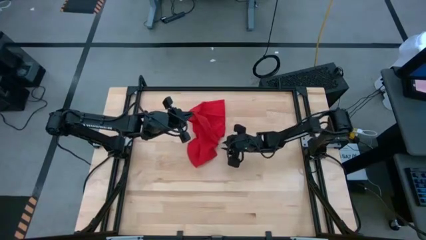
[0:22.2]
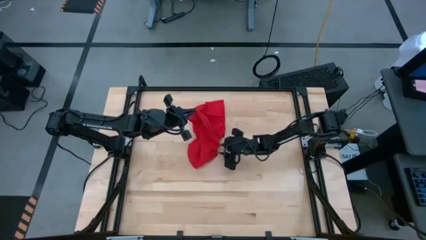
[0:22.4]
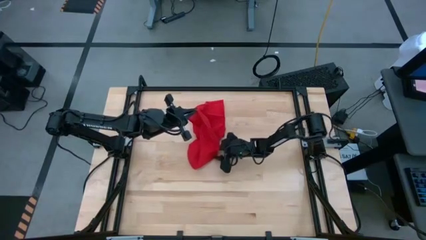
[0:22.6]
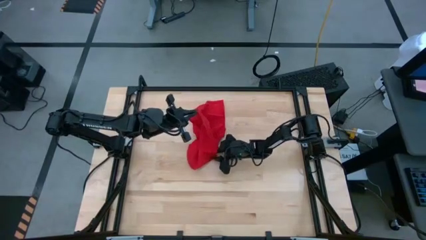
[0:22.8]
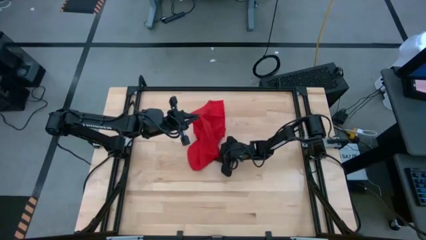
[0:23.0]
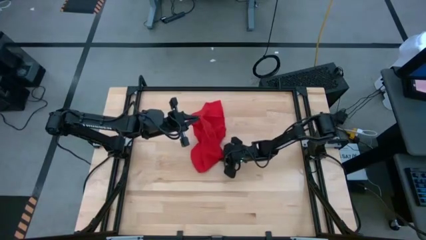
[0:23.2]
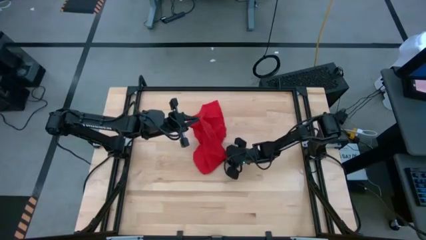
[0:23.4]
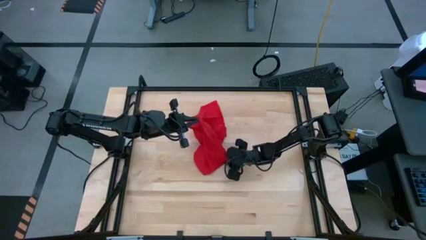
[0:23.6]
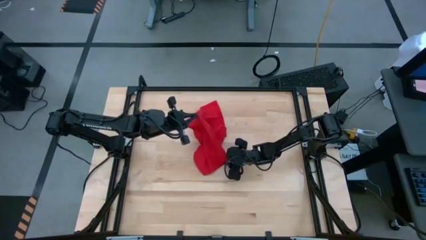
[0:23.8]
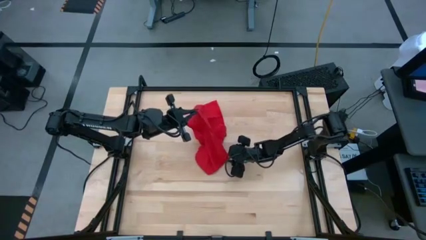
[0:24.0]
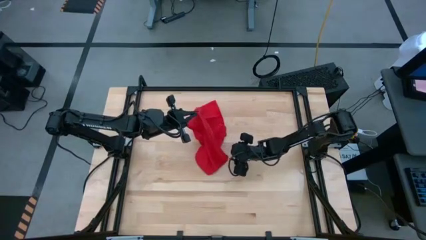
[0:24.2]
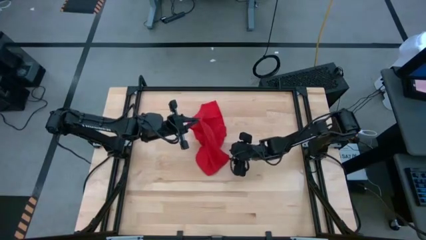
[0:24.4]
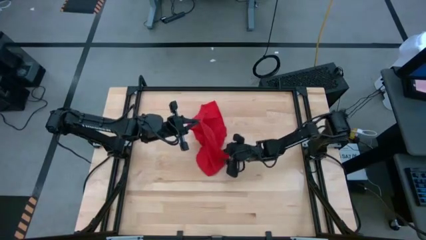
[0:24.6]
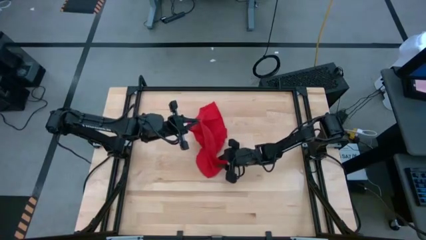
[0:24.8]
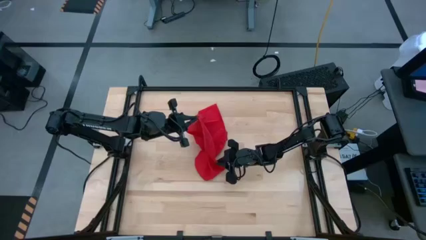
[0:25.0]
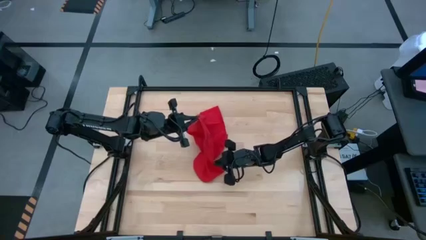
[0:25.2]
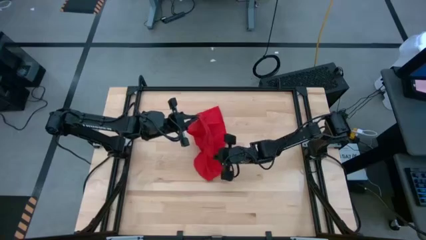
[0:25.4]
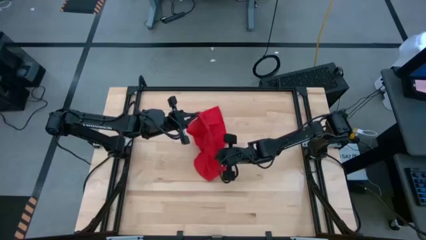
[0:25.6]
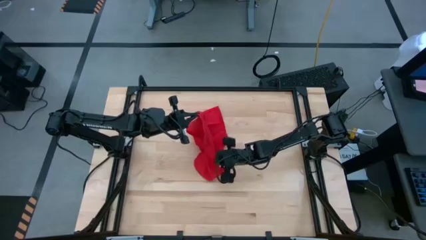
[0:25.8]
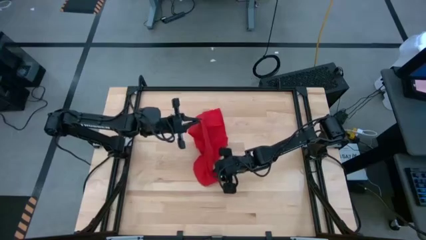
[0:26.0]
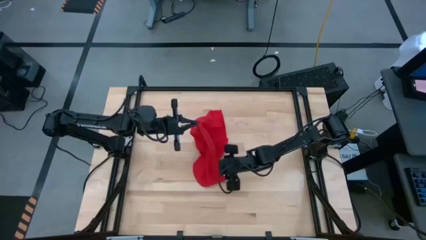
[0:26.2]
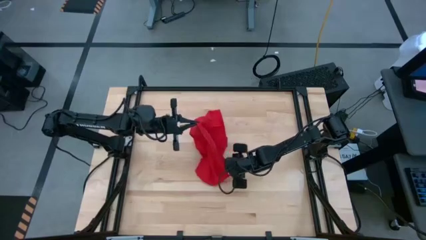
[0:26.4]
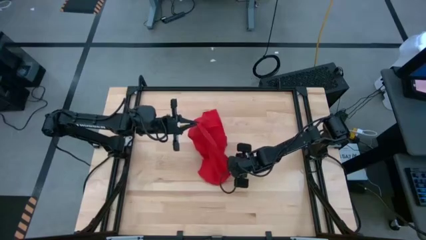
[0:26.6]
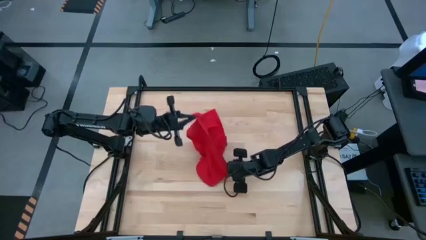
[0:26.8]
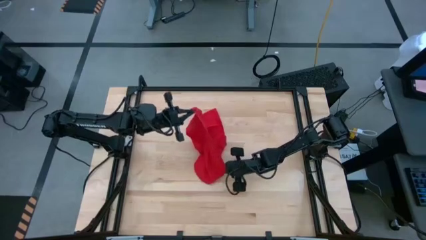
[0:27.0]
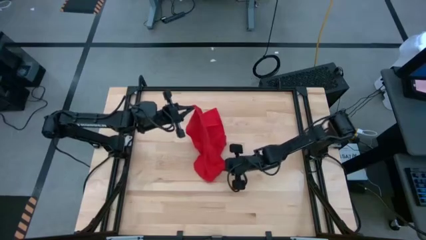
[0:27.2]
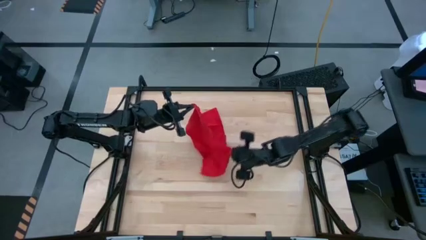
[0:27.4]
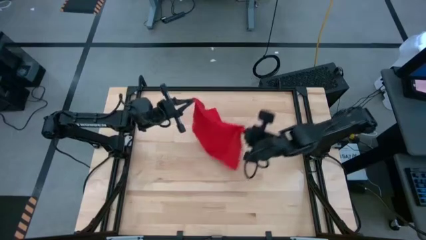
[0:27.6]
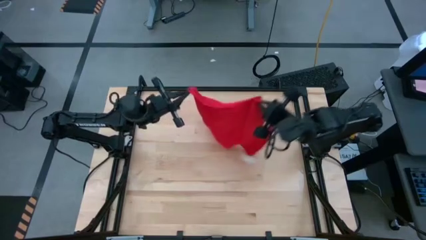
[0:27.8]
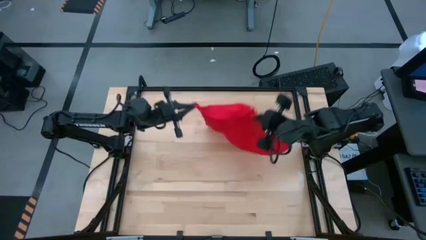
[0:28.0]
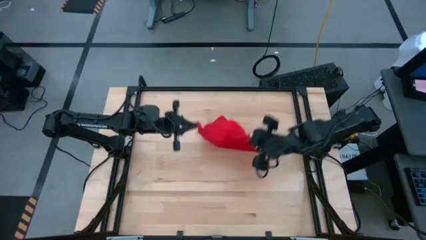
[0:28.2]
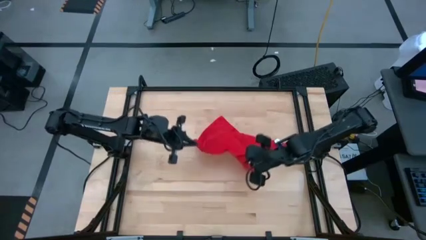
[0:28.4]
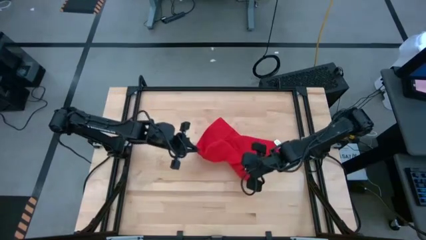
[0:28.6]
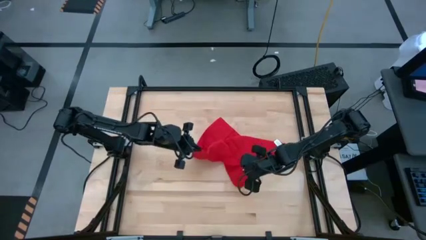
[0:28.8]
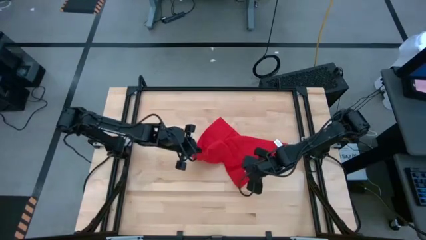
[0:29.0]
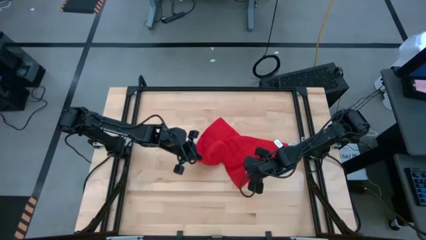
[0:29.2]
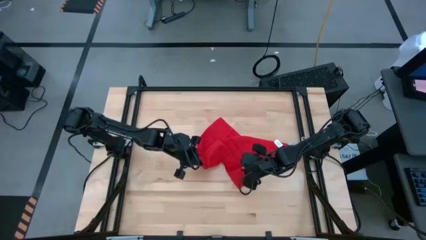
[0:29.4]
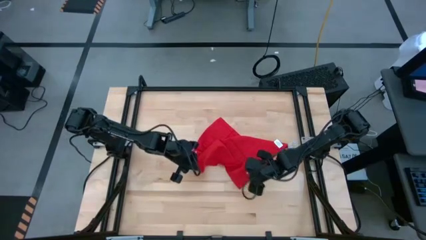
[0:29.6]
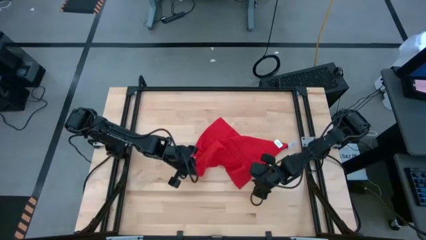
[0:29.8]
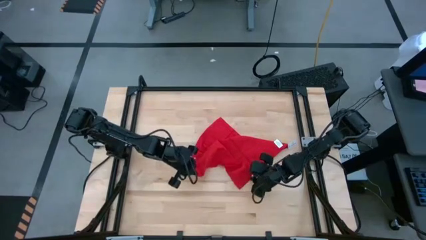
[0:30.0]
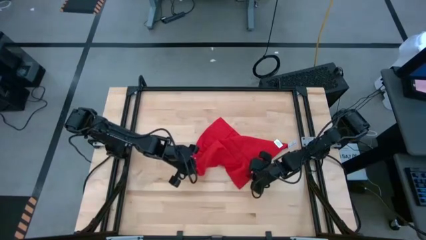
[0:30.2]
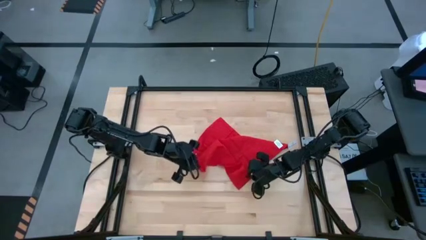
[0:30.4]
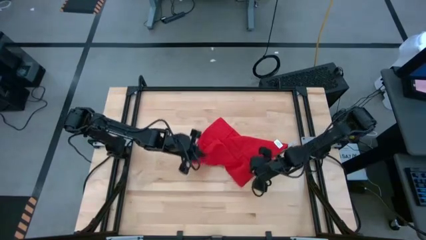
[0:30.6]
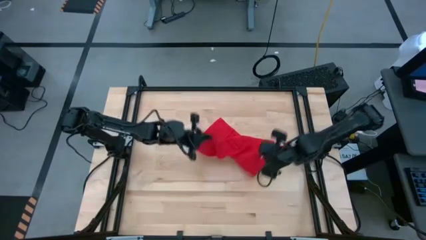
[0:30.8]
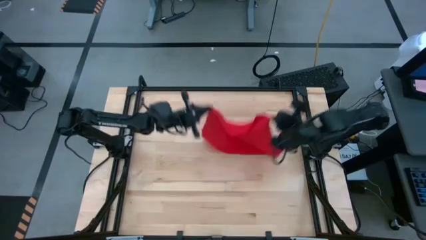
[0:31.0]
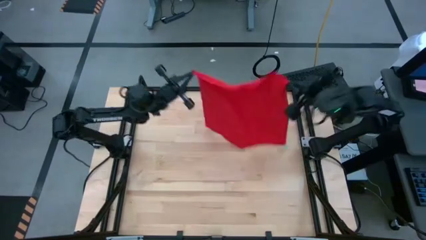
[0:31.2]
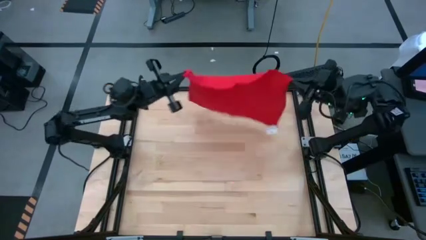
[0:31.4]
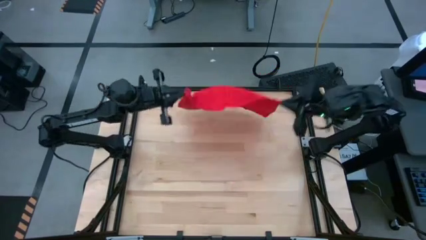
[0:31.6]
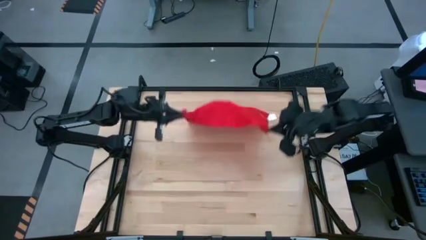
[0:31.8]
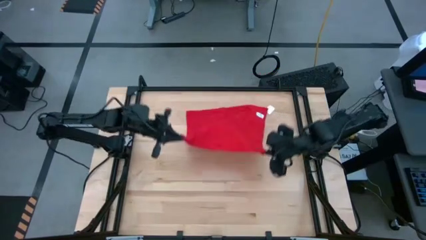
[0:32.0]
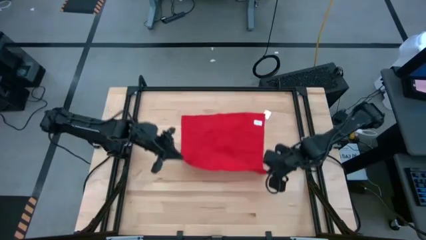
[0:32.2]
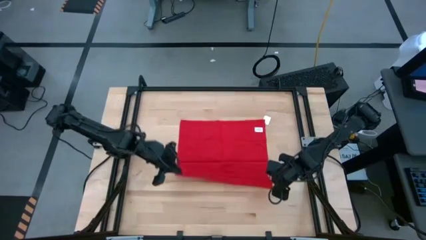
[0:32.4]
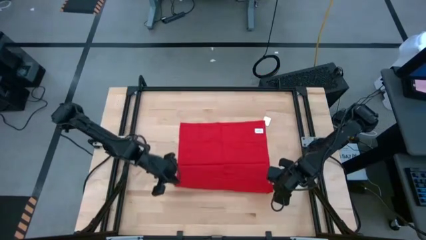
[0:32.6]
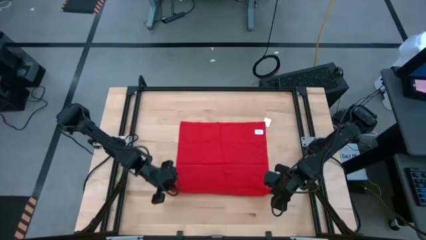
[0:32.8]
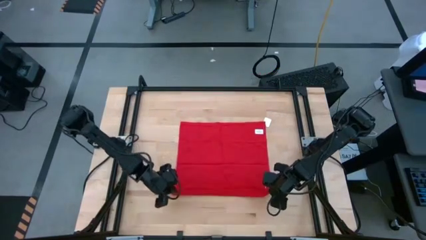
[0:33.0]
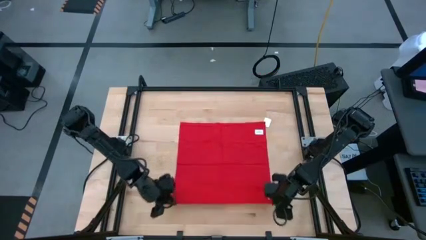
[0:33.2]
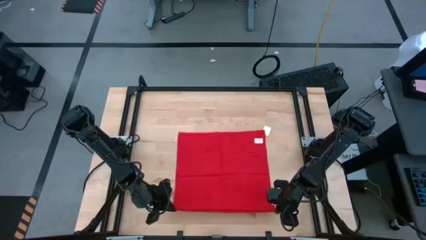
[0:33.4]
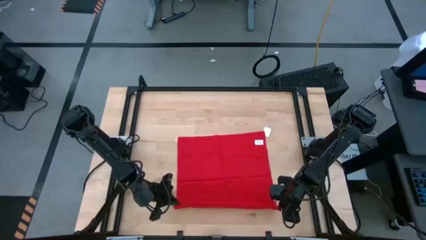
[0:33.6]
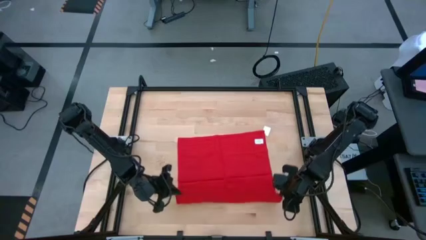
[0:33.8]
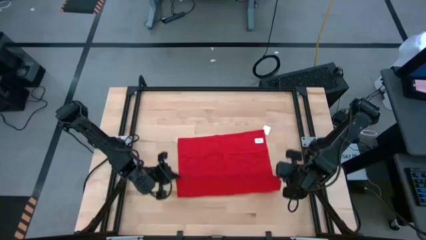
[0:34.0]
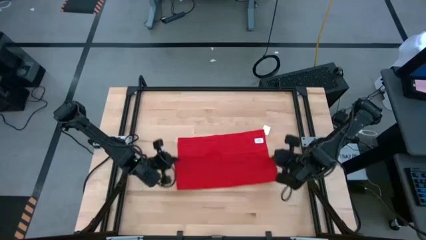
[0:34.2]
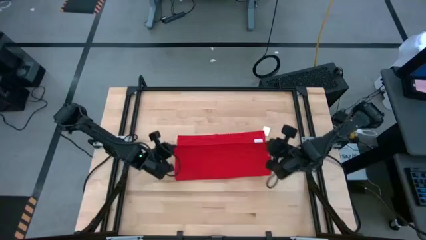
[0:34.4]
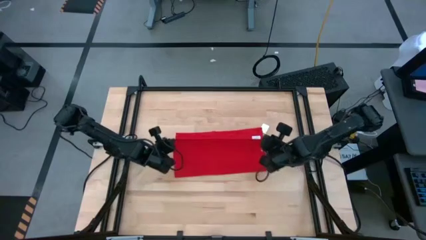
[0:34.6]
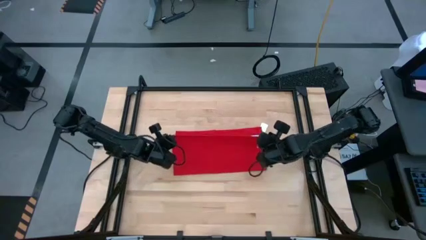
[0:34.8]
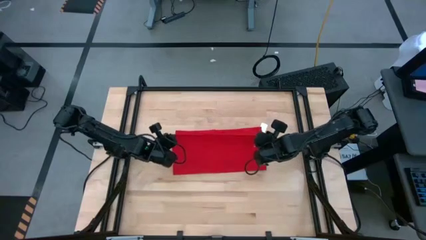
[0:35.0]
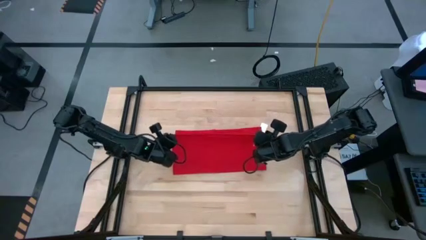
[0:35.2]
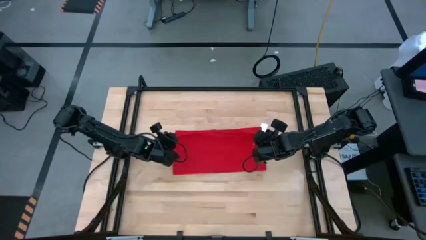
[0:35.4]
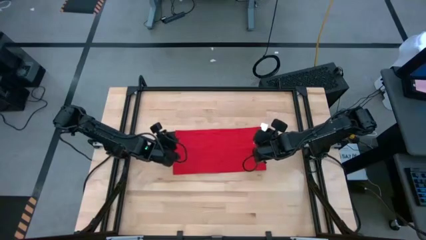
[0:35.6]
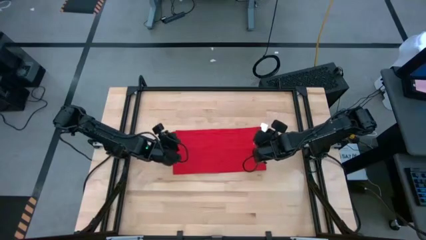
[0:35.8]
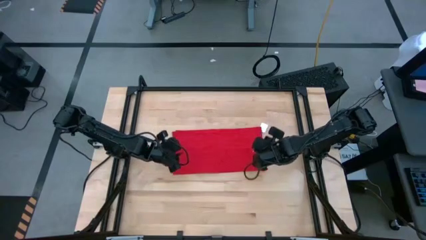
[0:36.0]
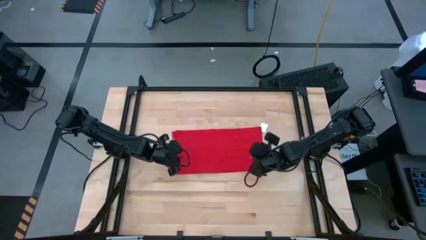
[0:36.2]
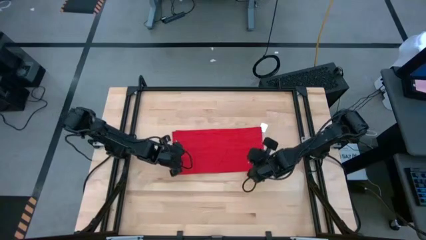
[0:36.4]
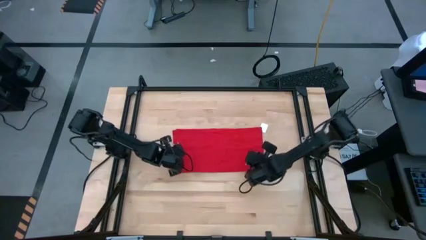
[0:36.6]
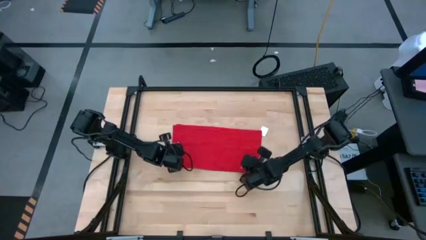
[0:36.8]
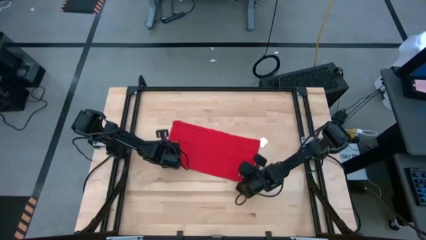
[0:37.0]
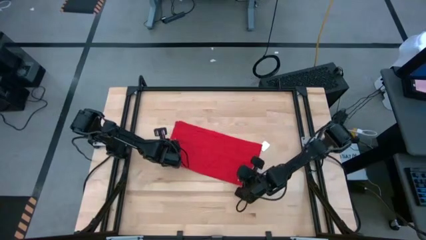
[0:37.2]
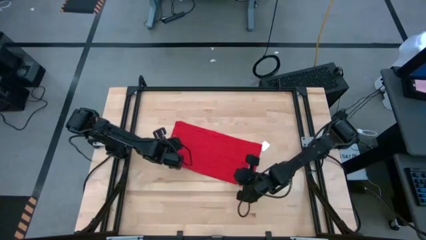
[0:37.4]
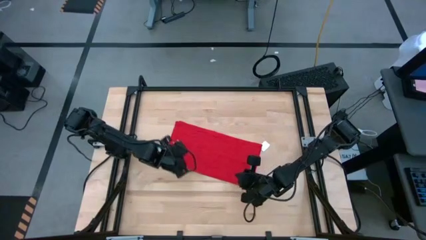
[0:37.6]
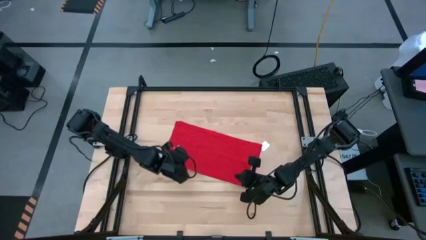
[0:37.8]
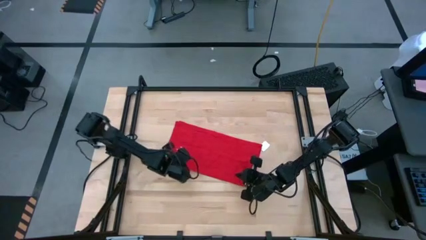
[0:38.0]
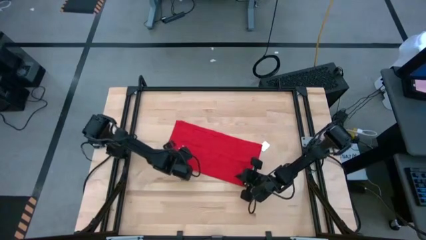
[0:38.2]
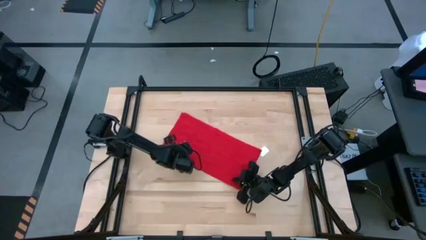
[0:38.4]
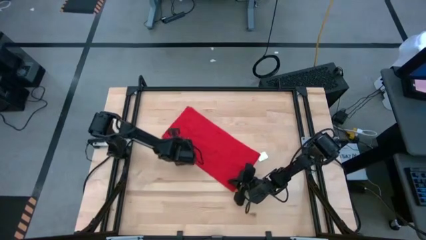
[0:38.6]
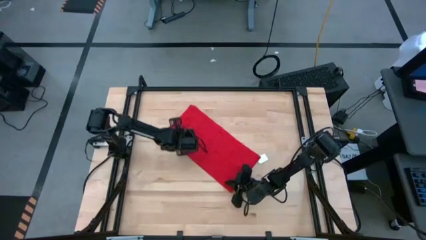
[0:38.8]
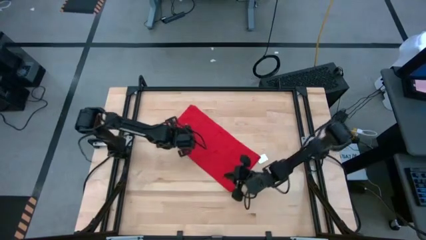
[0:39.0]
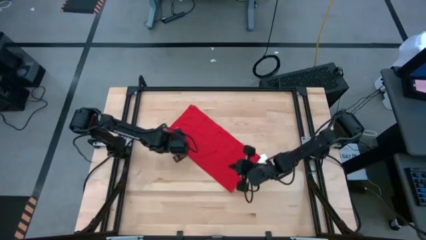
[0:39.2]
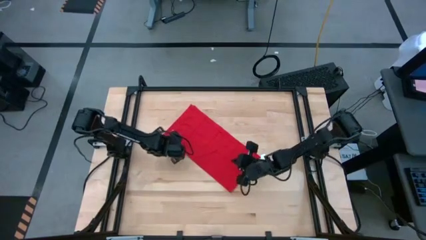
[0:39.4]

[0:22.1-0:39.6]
Task: Roll napkin
Fold the red napkin
